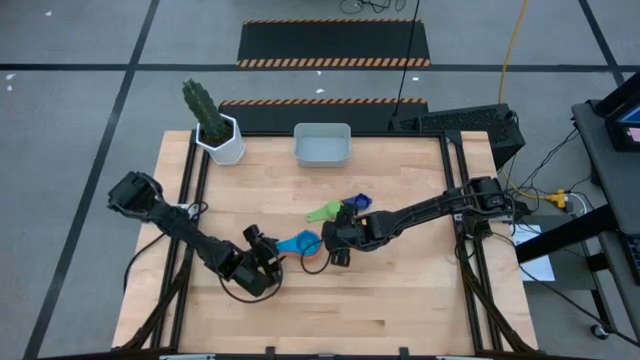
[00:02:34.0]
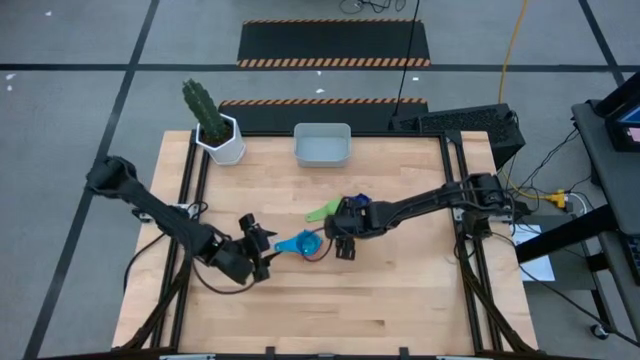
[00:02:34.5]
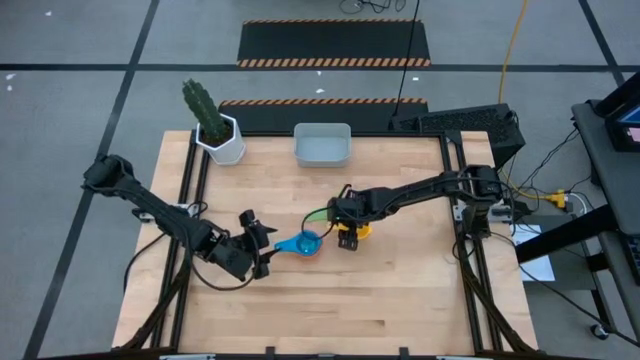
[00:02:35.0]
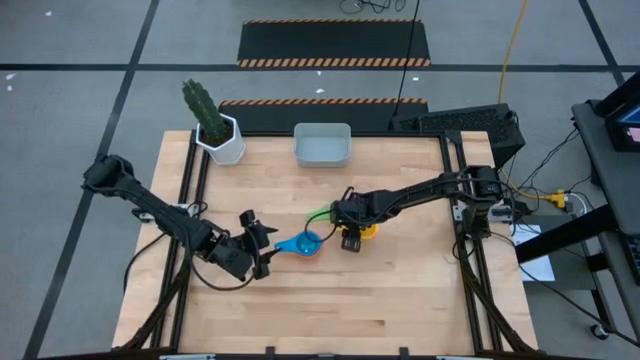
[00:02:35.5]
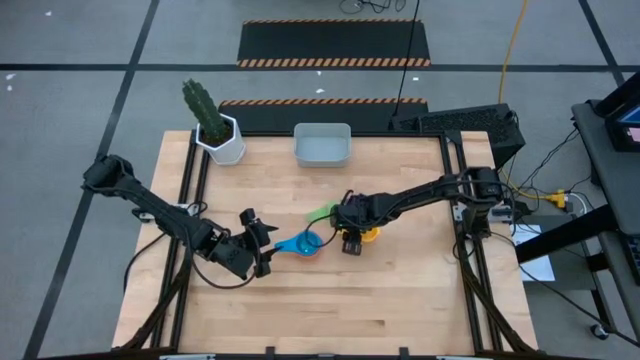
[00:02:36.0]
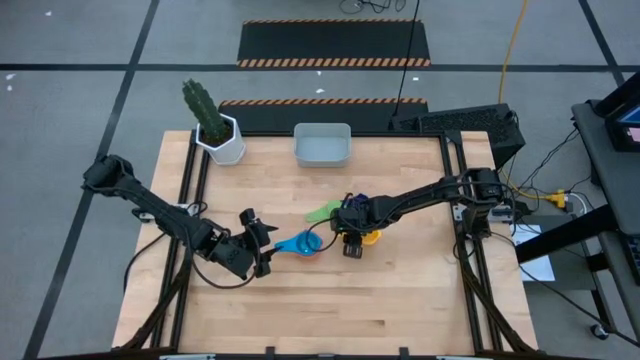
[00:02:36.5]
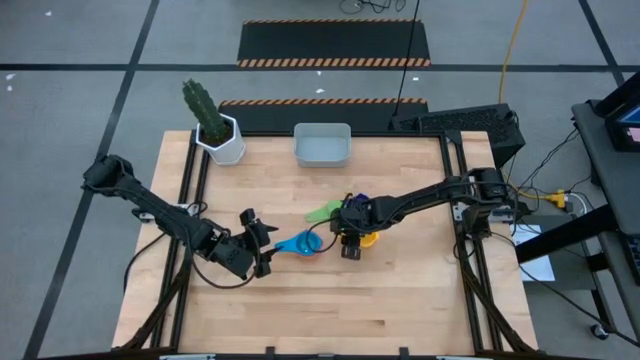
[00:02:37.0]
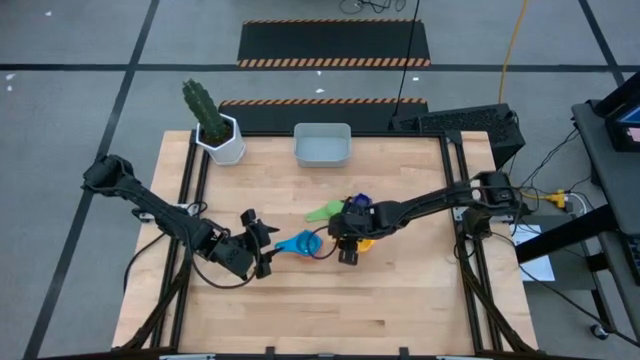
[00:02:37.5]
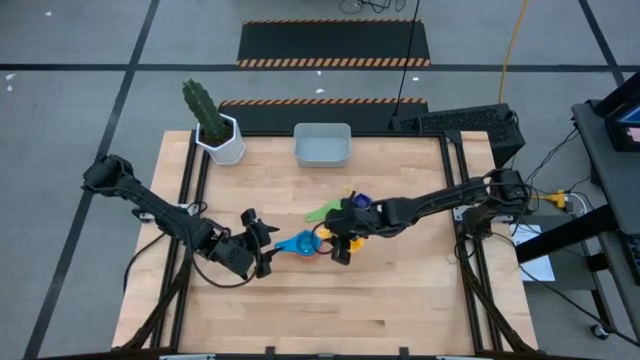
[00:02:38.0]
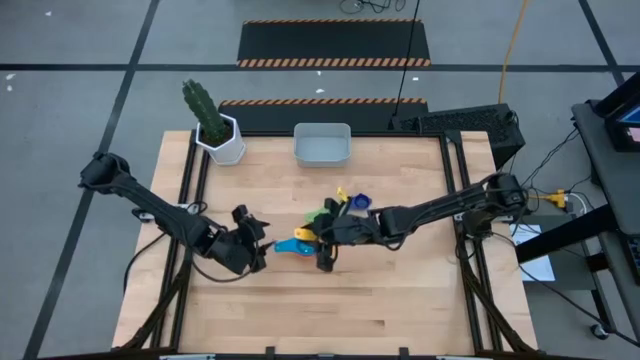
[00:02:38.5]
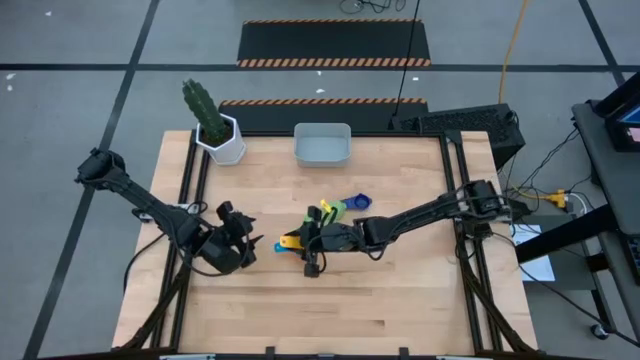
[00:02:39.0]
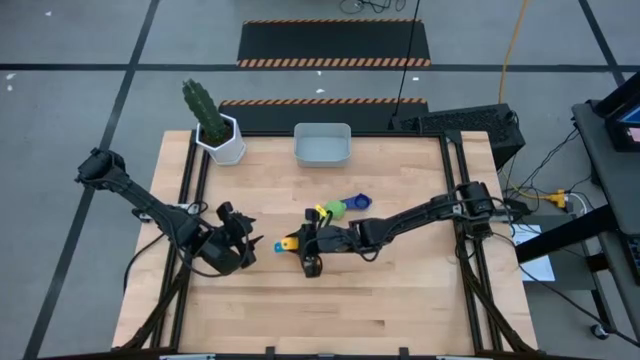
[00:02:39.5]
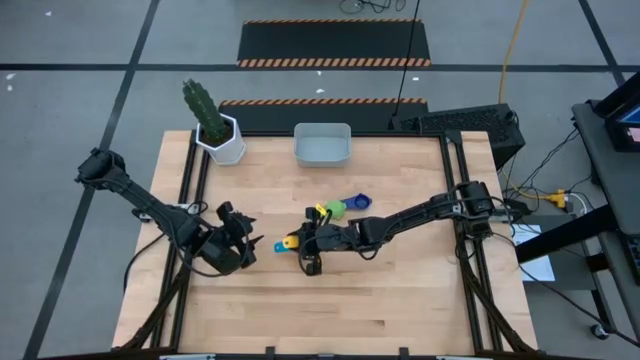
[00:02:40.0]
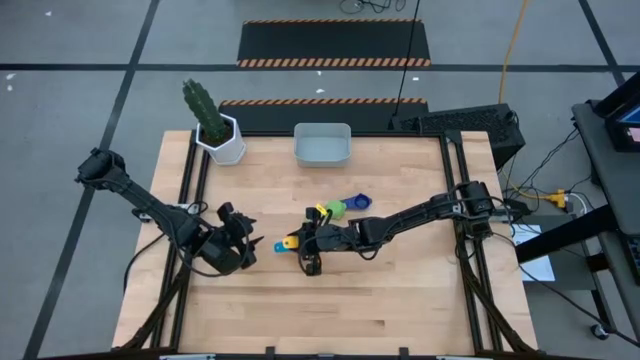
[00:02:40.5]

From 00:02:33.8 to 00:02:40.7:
Task: Nest measuring cups in basket
Stack the yellow measuring cups on top of the light blue measuring cup

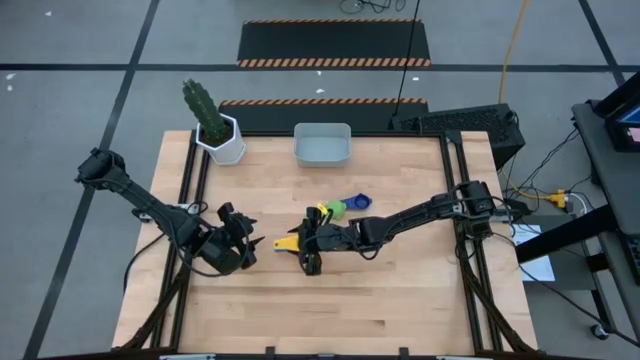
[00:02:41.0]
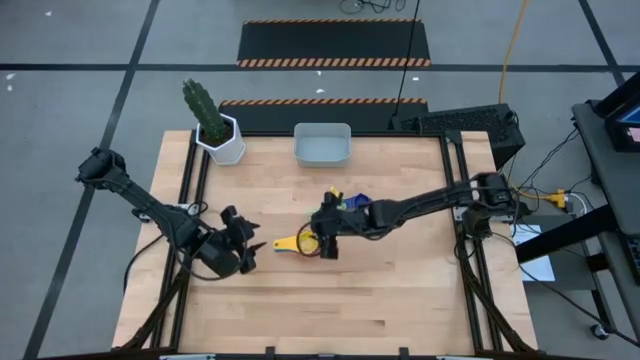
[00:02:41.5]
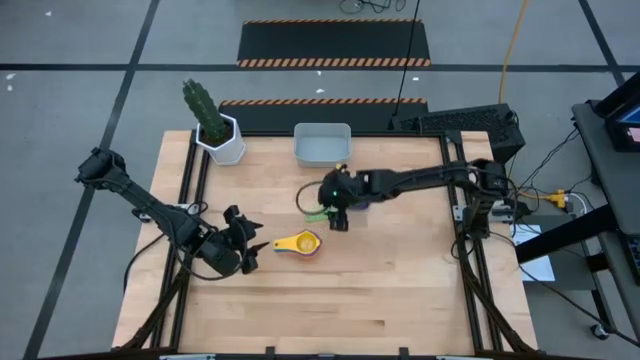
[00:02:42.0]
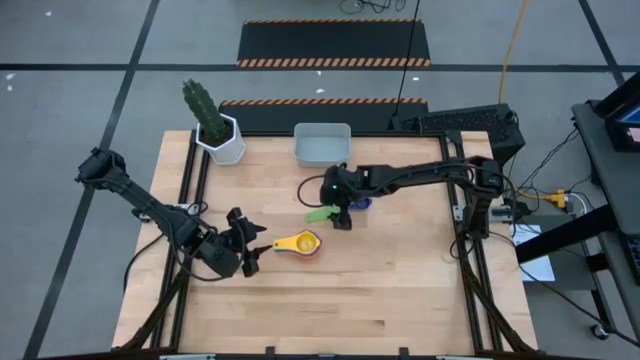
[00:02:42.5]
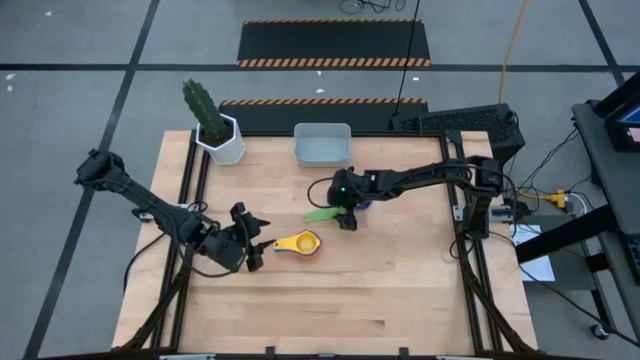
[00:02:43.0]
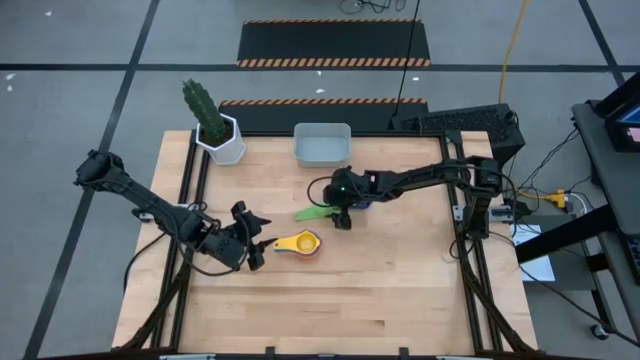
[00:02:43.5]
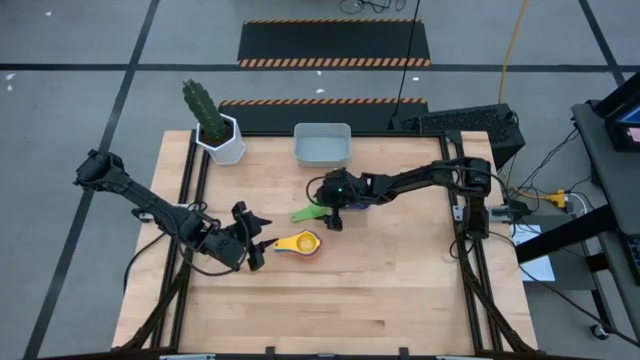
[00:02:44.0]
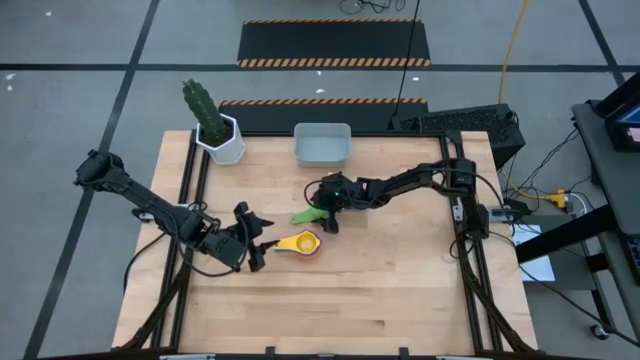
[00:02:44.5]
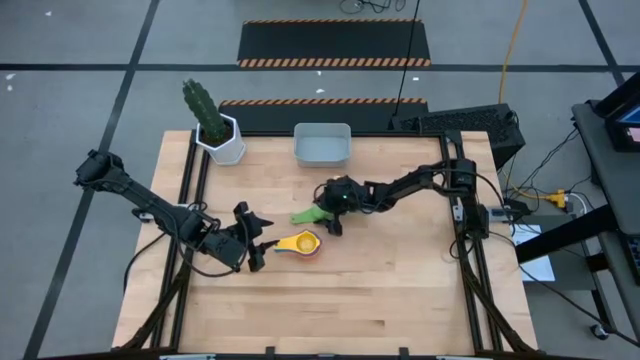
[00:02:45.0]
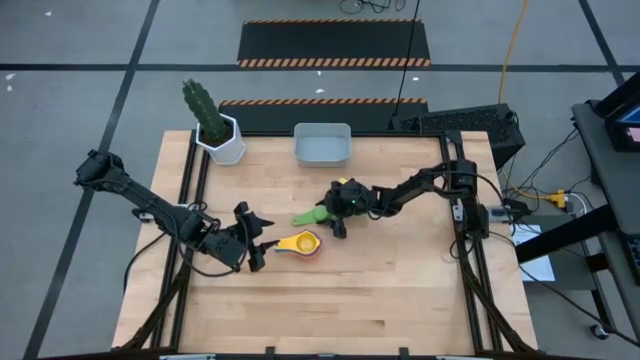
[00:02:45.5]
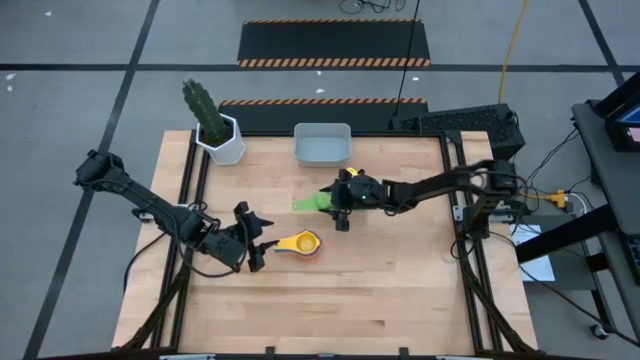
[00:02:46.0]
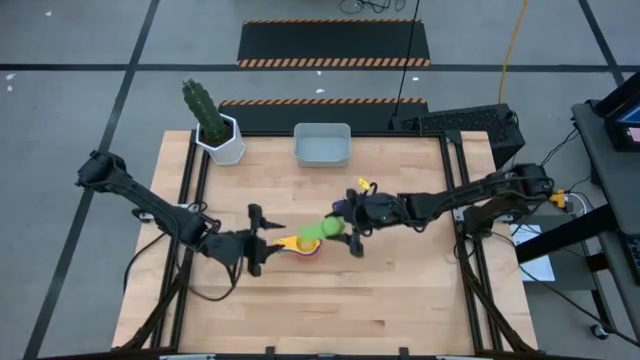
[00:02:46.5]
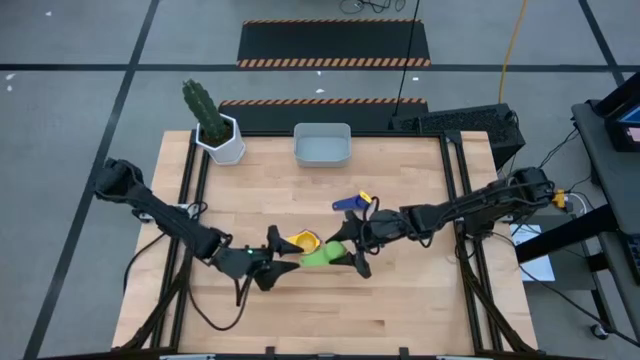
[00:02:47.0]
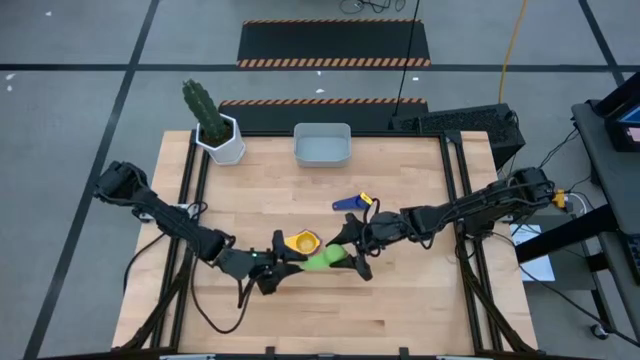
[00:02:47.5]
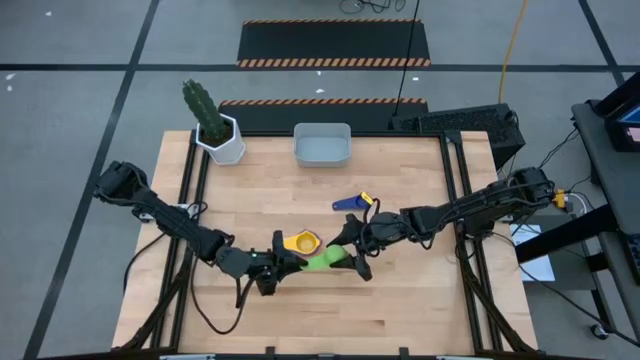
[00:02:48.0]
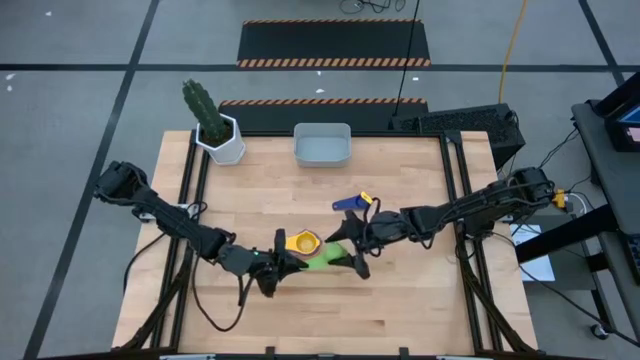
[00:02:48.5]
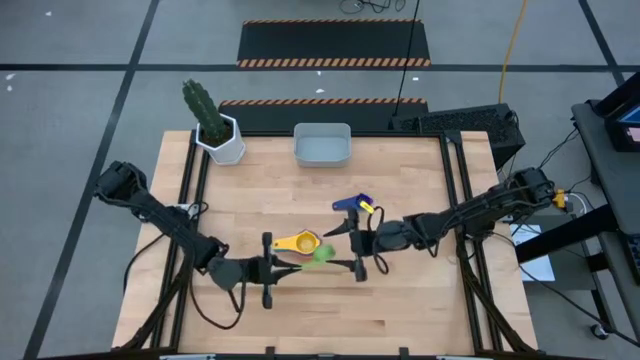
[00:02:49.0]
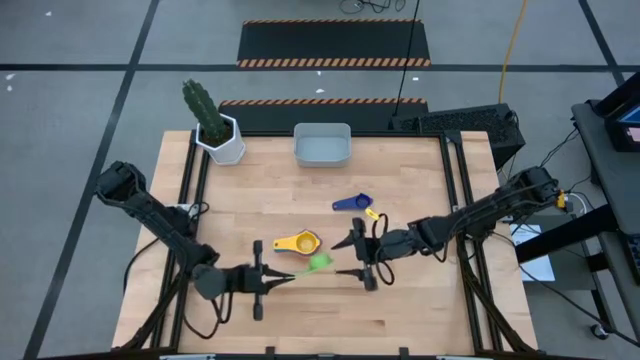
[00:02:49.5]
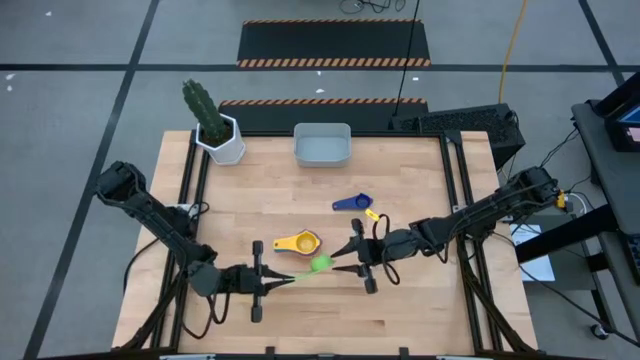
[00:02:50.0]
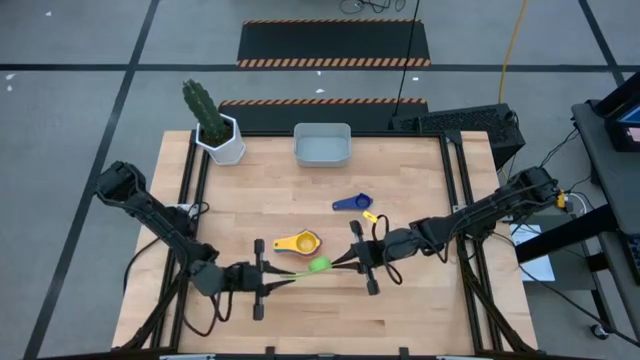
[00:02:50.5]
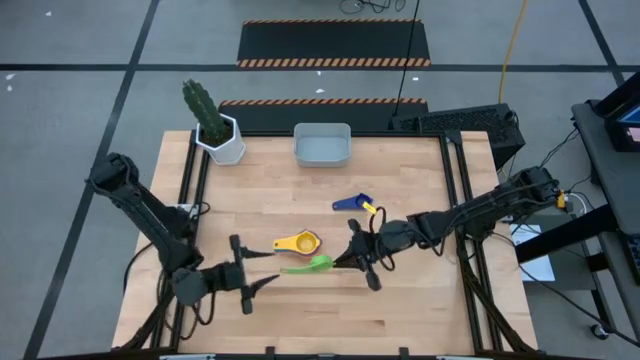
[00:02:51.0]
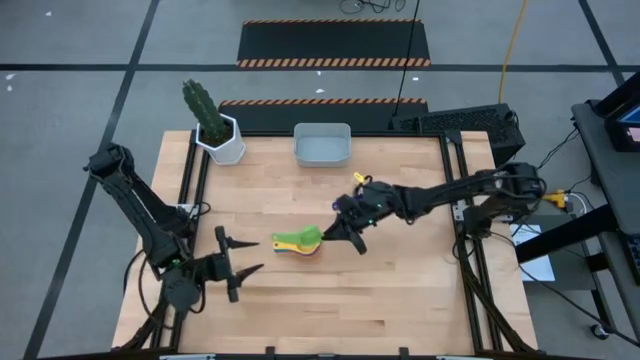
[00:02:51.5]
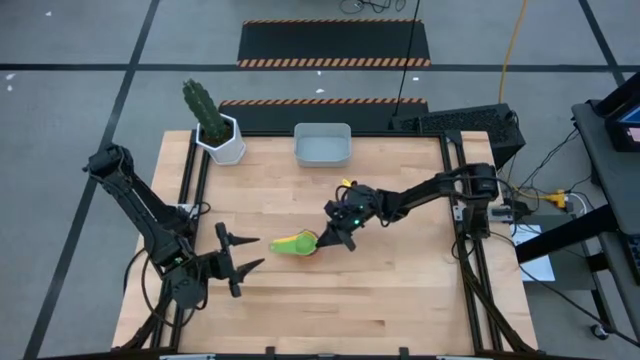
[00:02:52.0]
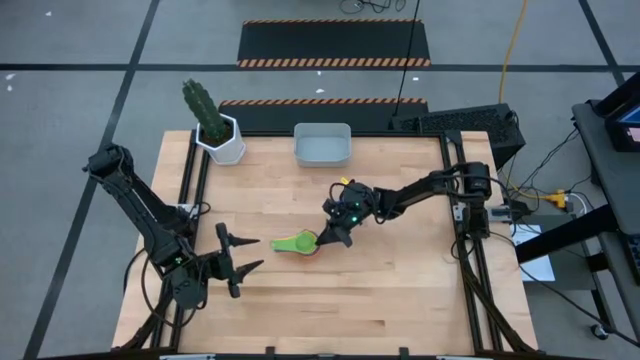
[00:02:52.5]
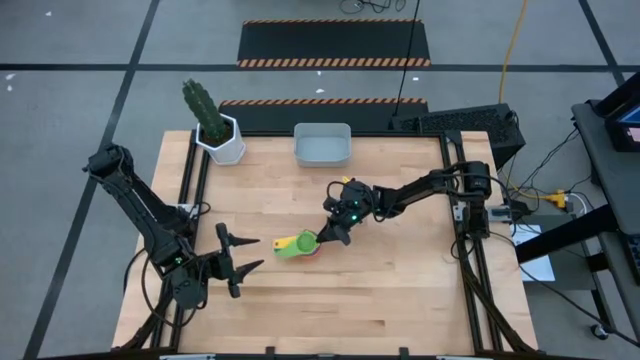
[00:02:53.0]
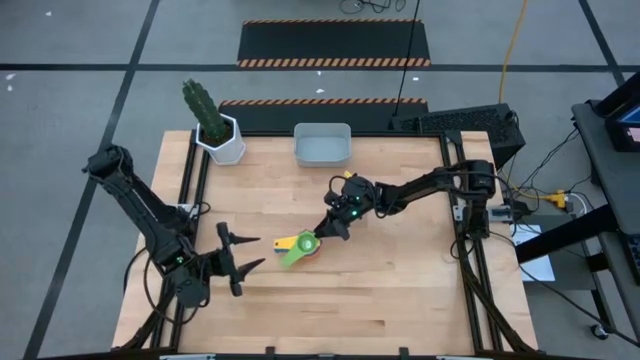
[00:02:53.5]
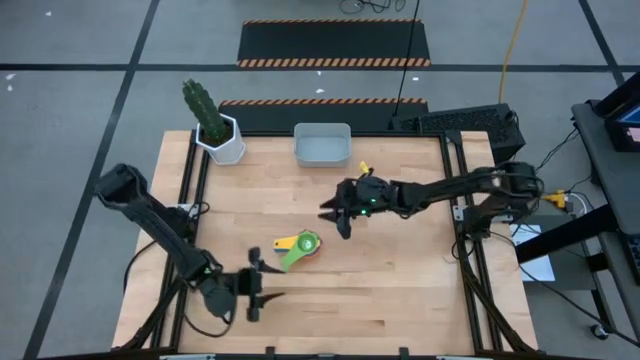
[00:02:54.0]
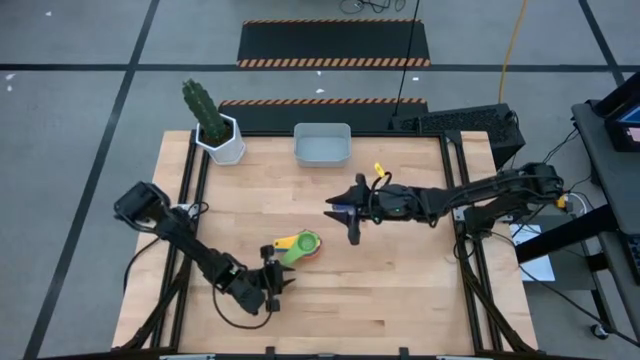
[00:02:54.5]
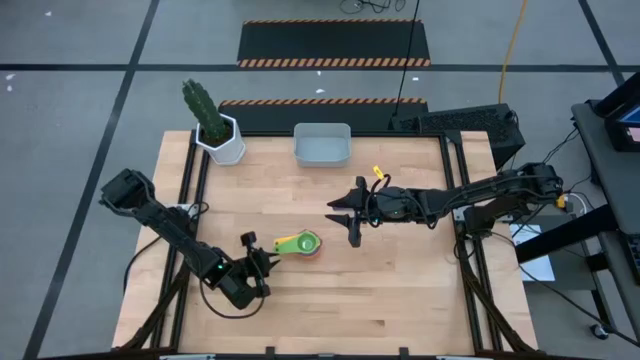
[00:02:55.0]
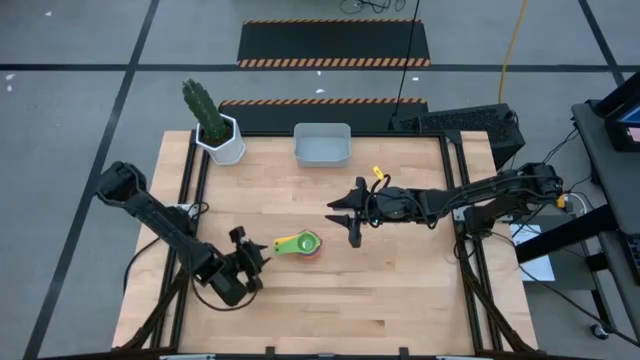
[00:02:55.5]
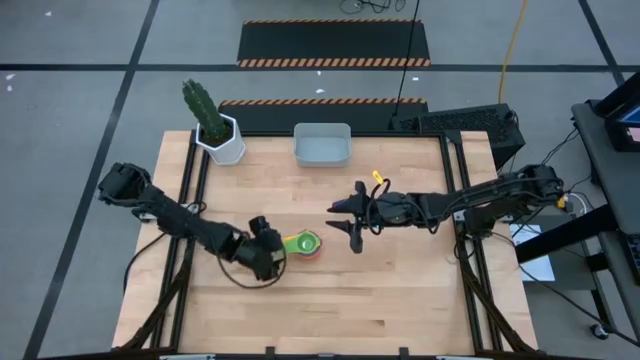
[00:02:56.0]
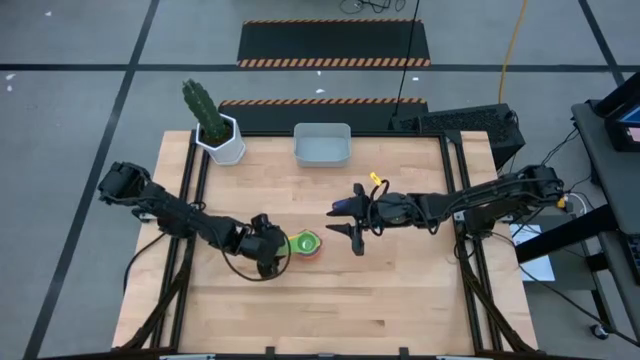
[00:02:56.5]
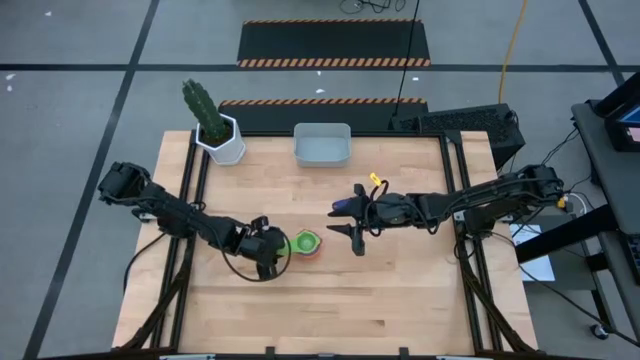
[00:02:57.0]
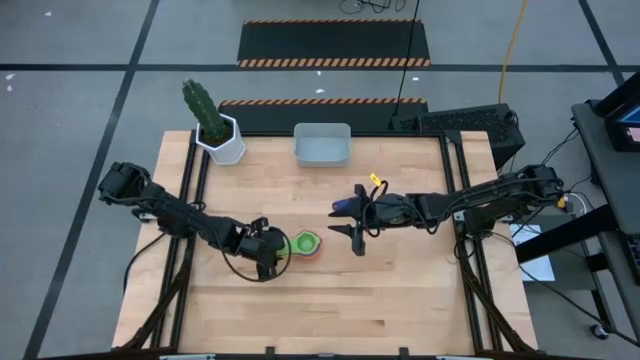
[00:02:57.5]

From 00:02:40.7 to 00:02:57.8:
Stack the green measuring cup on top of the yellow measuring cup
